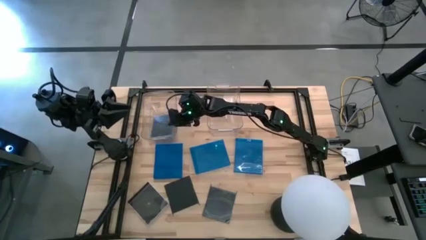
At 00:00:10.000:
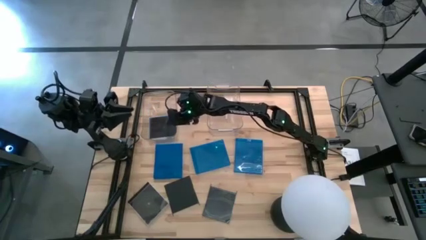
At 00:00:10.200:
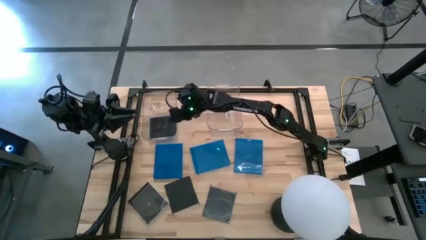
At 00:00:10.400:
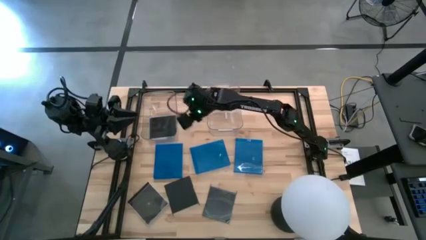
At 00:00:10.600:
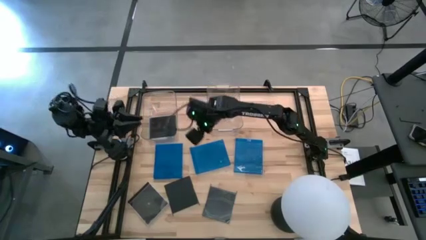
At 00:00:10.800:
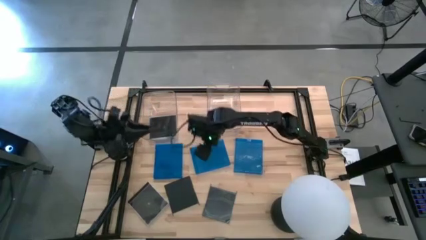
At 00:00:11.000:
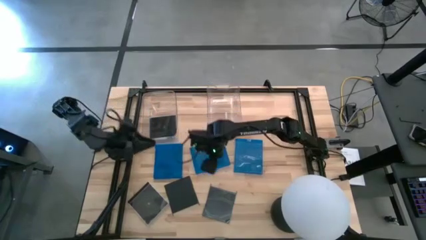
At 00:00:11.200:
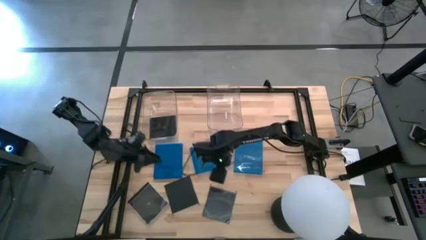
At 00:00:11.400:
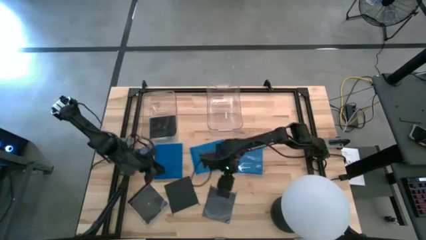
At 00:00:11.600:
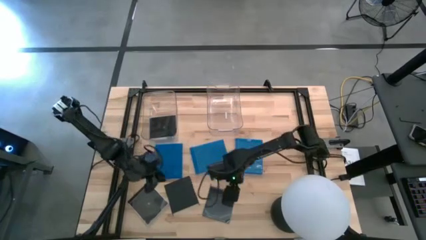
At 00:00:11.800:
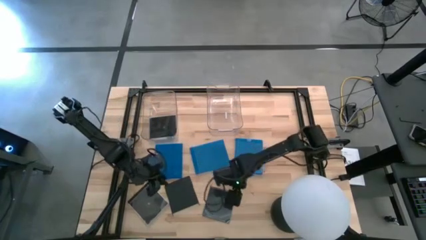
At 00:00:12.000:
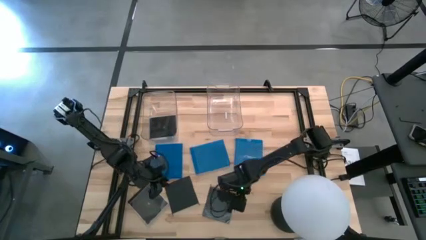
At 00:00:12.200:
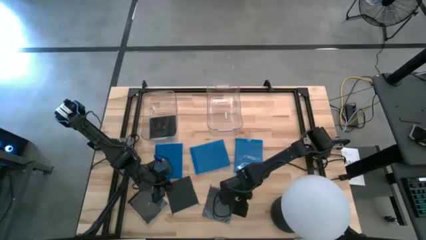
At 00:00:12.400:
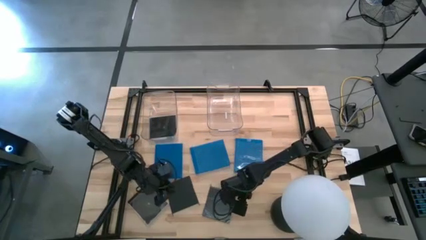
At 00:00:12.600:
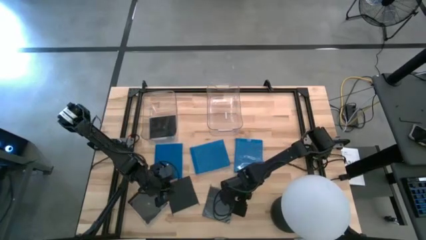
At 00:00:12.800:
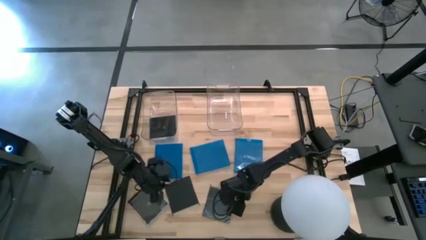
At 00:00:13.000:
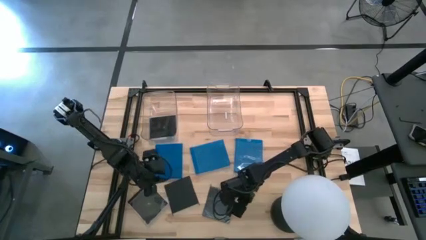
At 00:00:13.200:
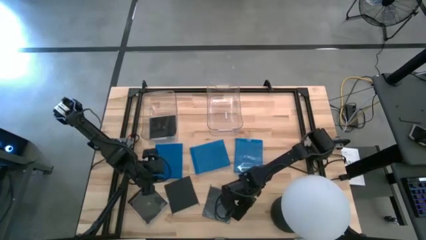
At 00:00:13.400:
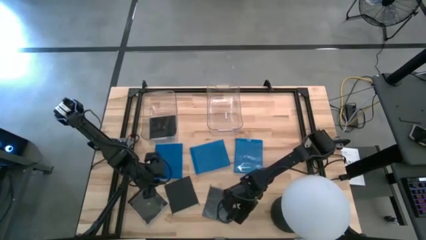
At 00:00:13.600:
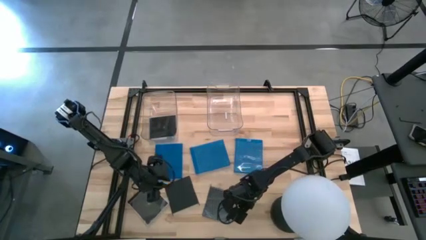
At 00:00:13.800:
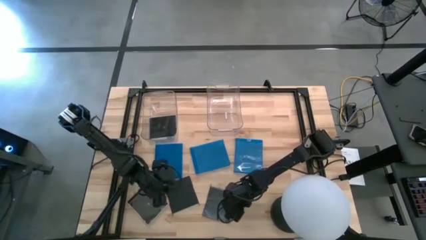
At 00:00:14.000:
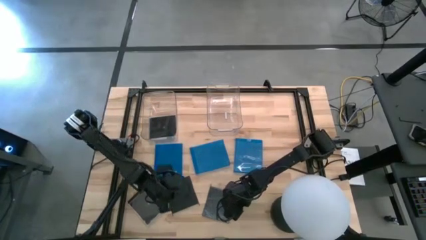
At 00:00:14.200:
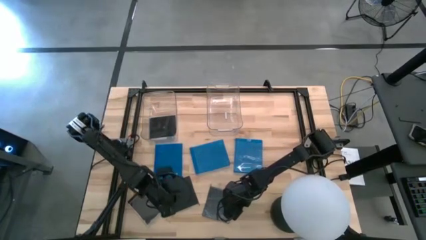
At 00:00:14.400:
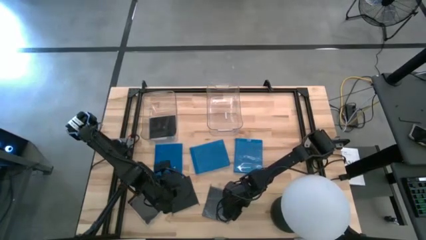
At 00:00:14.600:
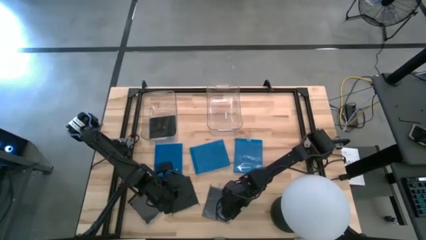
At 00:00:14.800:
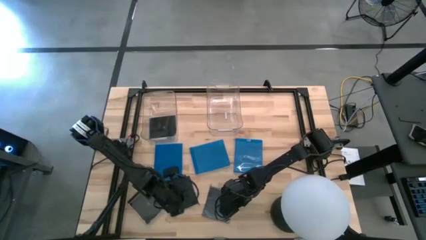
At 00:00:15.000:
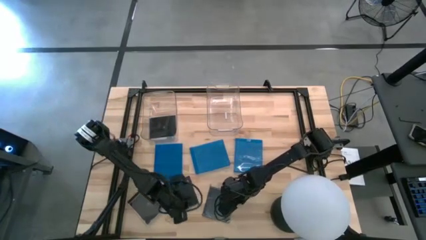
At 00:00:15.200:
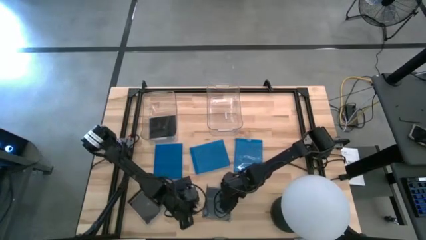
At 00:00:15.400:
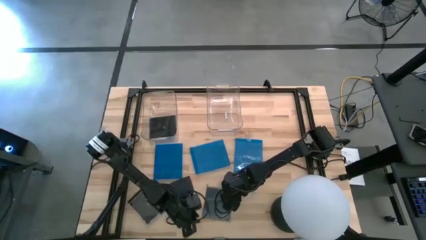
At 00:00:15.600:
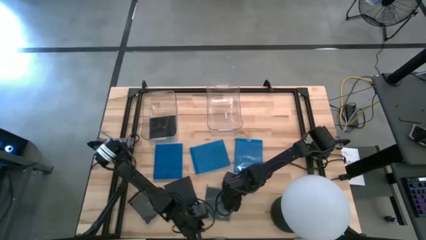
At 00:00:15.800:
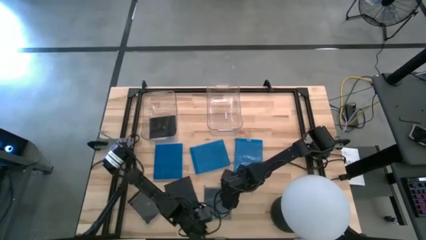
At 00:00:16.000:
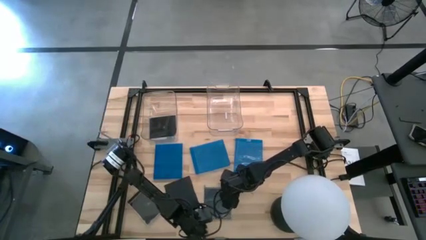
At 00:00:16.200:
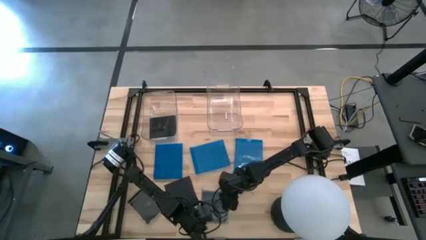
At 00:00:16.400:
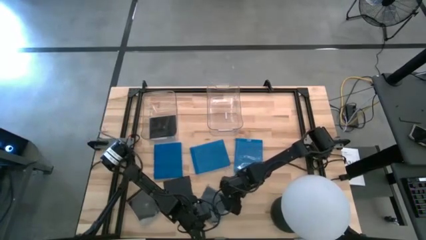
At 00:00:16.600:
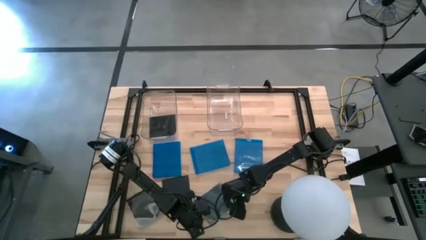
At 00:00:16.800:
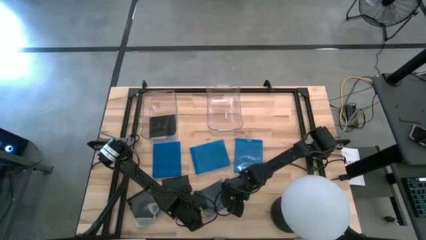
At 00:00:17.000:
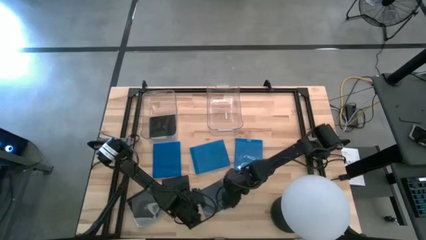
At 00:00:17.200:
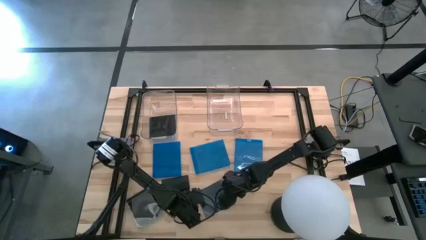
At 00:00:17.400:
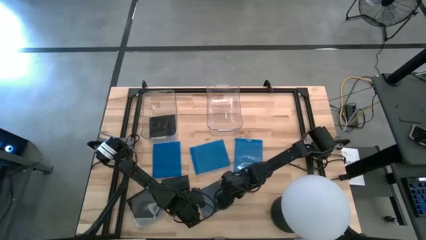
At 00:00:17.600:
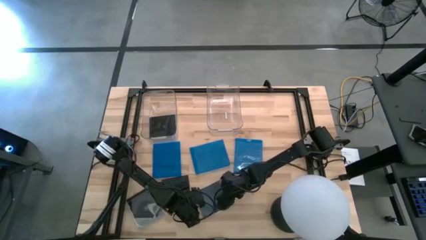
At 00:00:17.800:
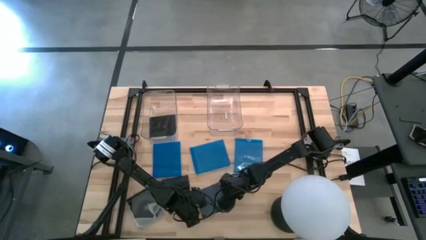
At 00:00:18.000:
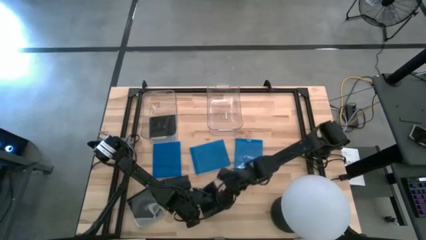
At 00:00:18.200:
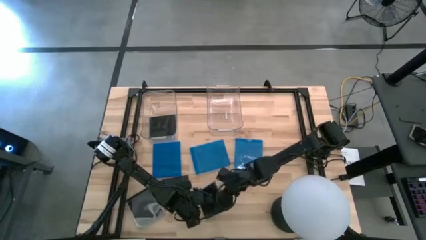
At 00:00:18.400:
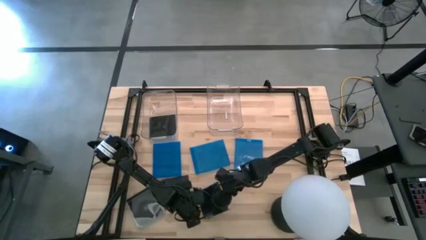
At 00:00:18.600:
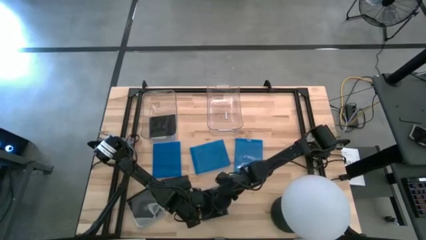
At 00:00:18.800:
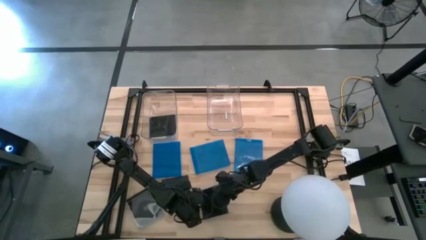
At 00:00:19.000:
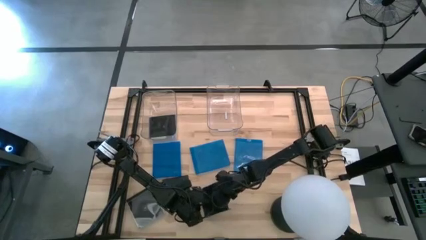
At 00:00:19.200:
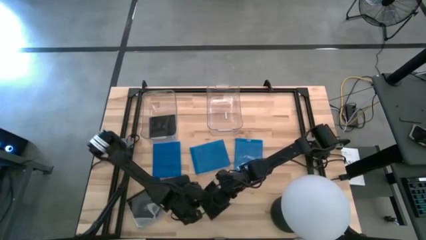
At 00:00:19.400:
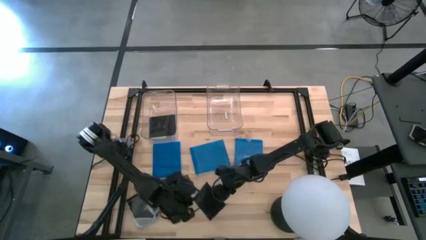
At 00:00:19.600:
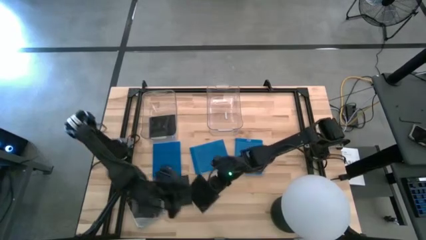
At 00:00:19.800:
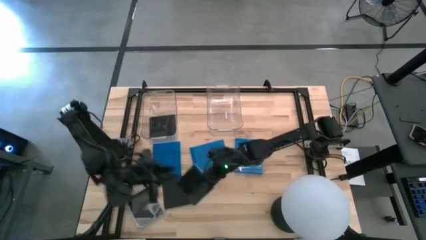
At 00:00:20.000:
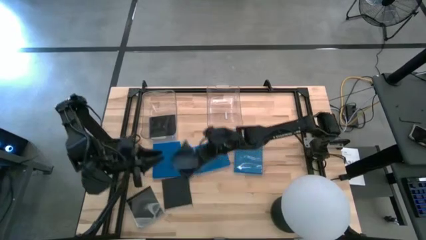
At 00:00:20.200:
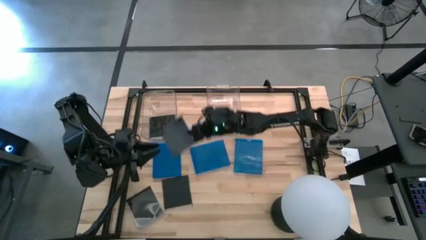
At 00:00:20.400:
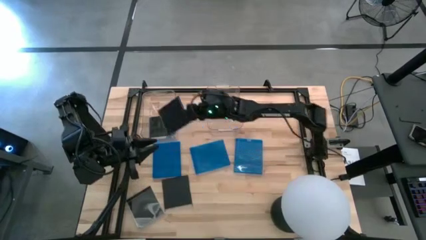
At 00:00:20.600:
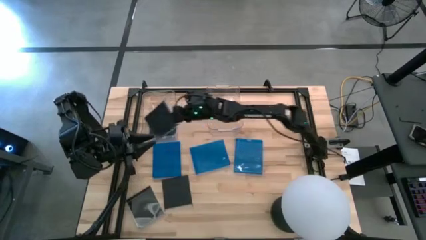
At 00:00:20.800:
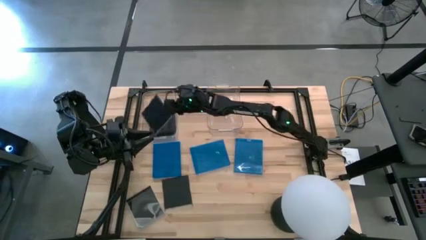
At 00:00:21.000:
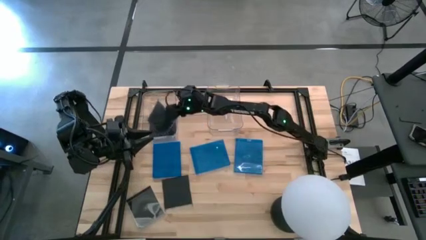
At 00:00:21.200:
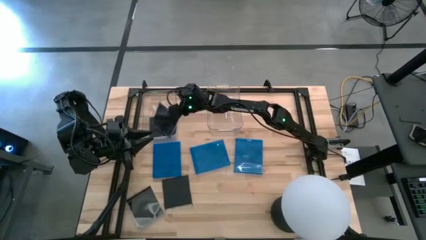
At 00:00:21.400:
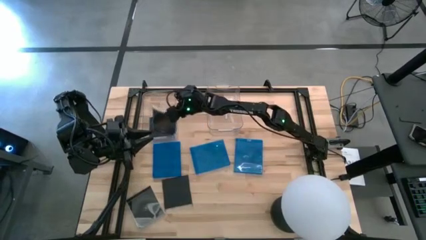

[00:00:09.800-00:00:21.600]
Task: Pick & place jewel cases by type
Put the black CD case into the left transparent bin

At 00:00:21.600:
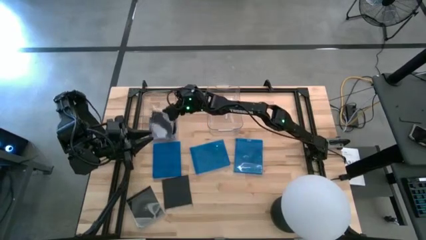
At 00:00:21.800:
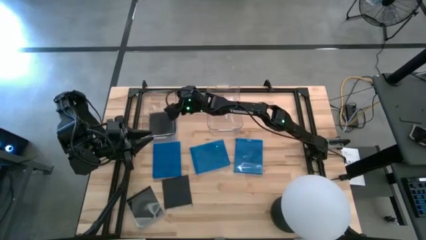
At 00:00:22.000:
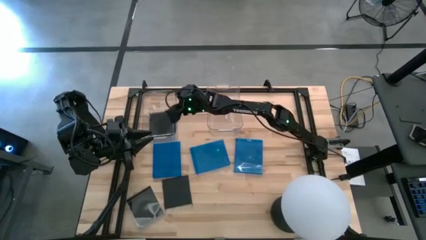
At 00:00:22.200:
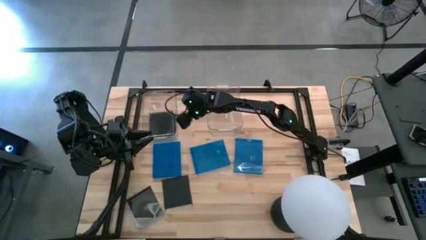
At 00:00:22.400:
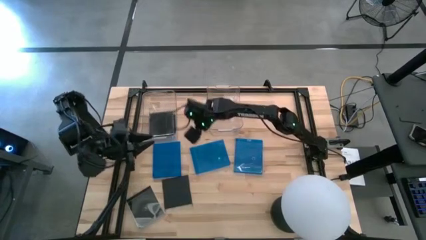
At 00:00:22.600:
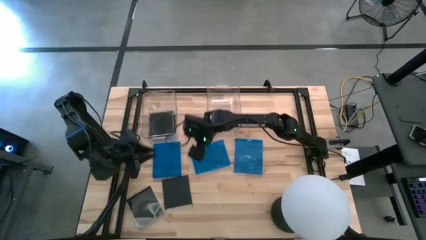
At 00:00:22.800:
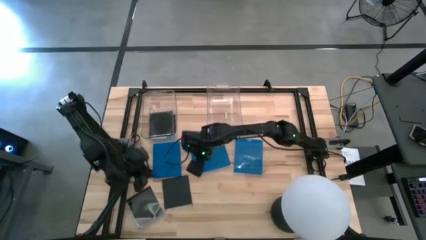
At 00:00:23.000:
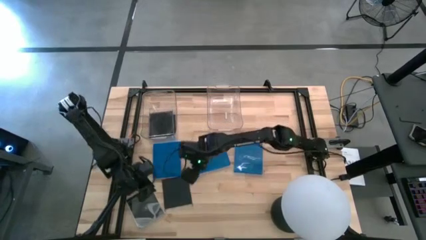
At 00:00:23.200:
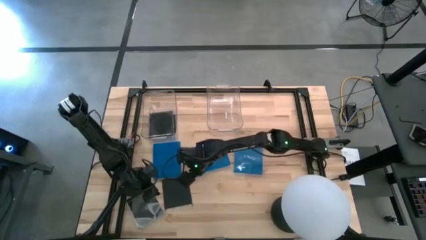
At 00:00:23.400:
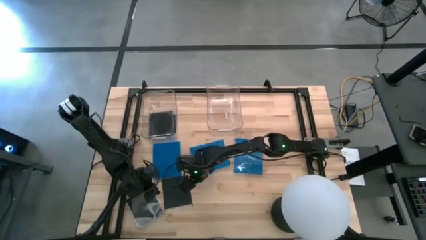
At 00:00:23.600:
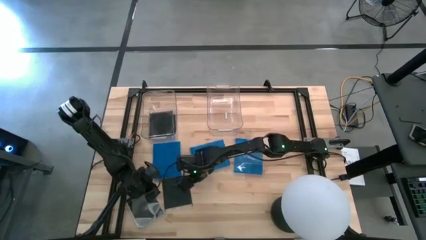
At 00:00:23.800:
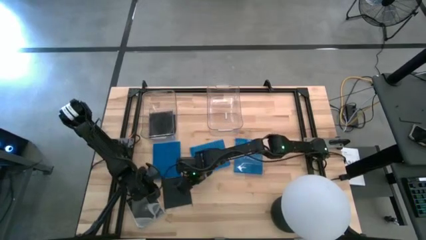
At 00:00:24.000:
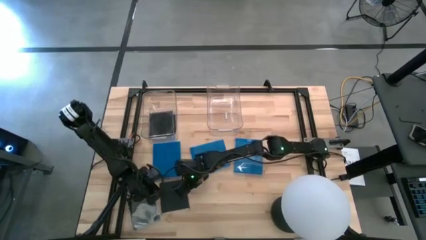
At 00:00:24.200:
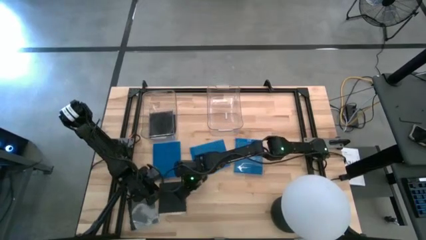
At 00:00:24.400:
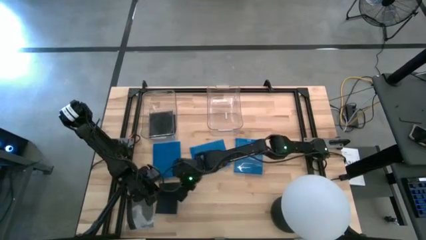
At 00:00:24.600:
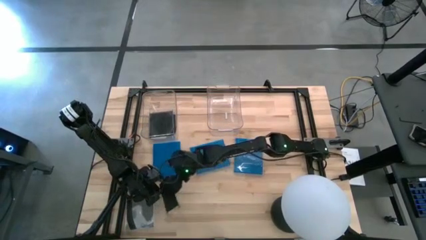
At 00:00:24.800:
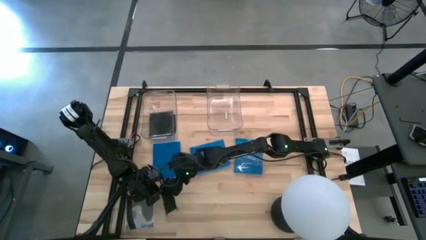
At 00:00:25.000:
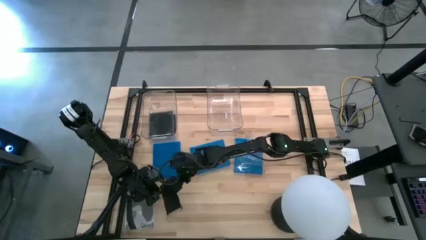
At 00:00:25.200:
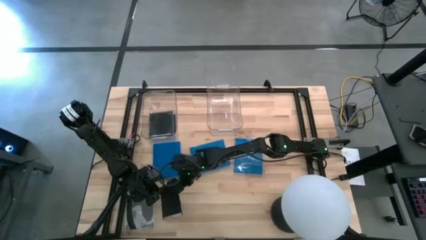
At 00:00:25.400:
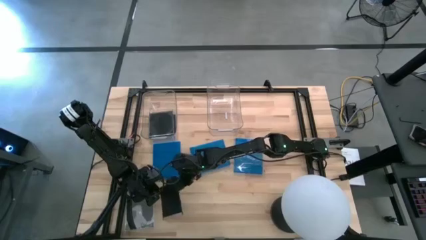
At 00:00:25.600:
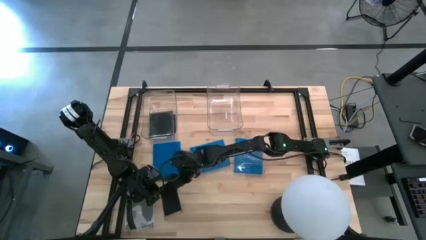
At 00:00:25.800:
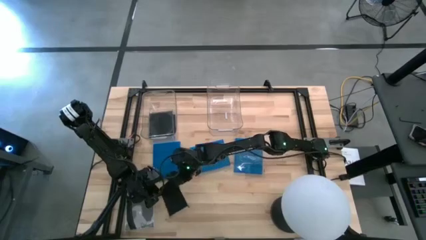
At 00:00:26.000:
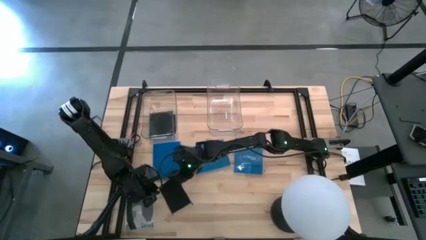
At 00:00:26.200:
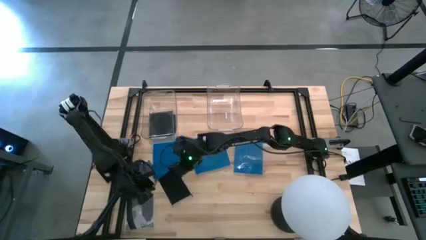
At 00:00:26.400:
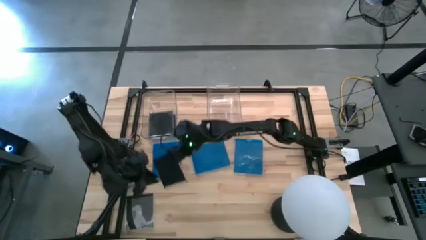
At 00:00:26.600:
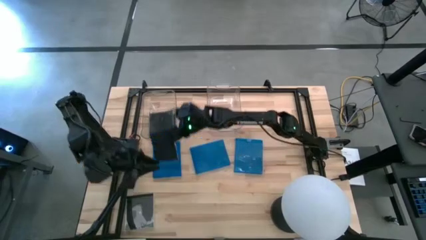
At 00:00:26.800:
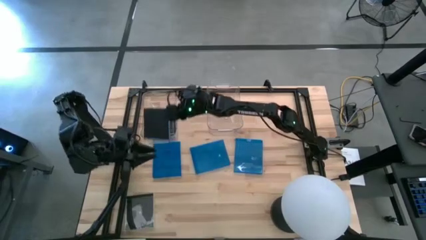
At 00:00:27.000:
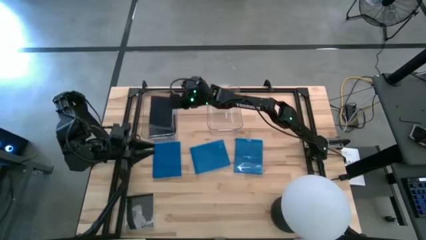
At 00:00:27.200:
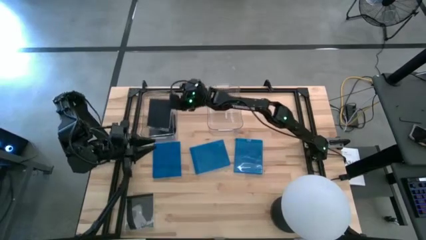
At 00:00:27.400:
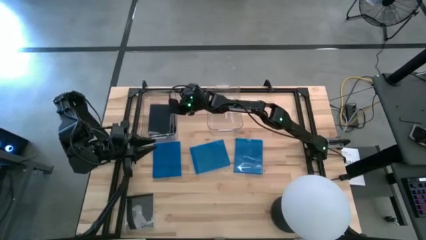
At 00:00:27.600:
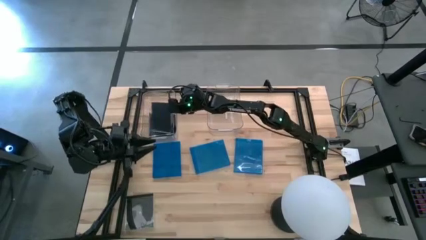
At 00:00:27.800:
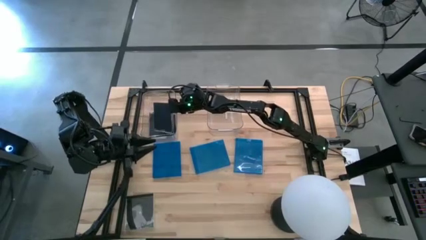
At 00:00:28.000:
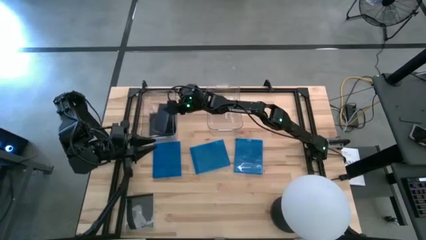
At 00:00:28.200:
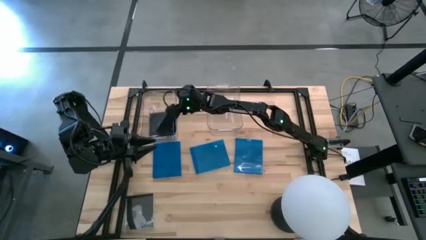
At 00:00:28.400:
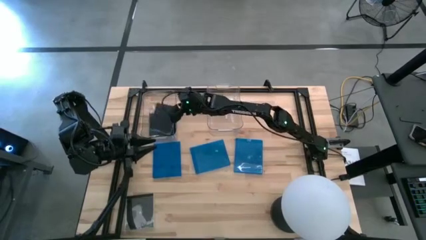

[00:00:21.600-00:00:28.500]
Put the black CD case into the left transparent bin
